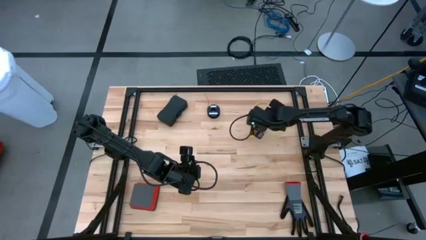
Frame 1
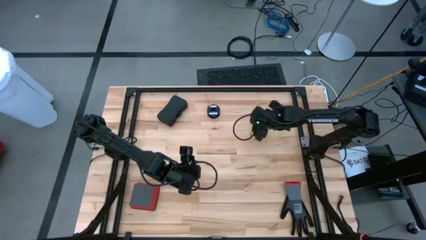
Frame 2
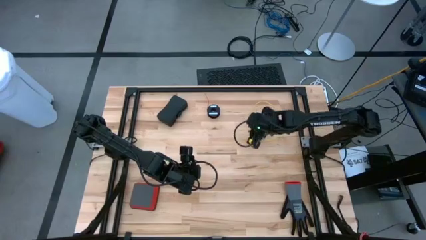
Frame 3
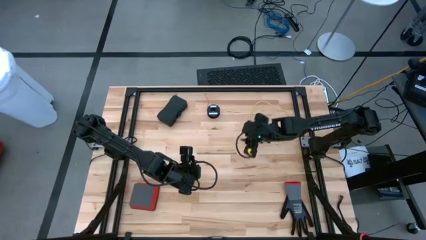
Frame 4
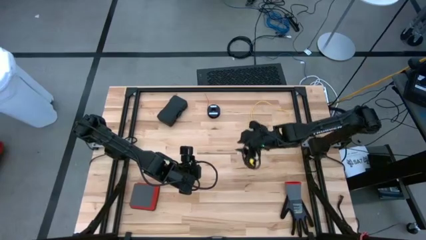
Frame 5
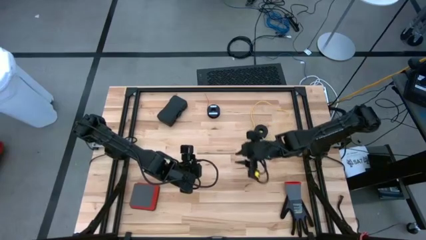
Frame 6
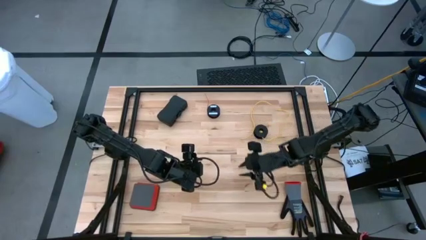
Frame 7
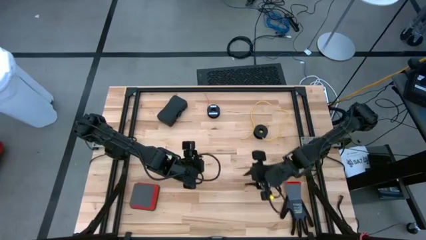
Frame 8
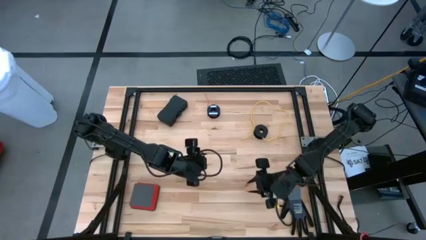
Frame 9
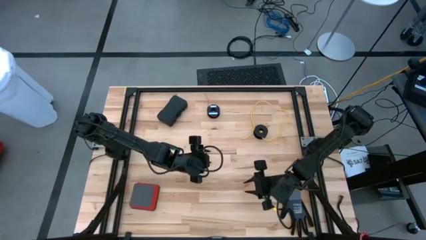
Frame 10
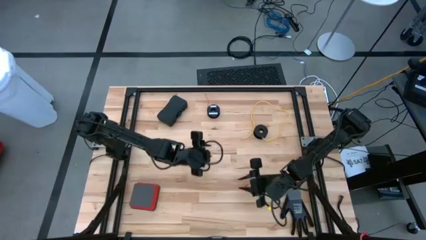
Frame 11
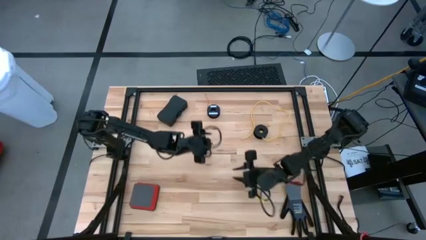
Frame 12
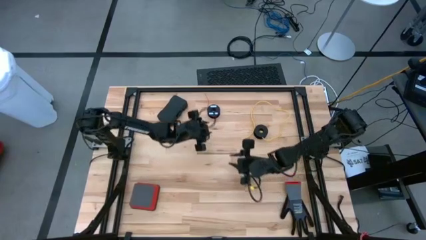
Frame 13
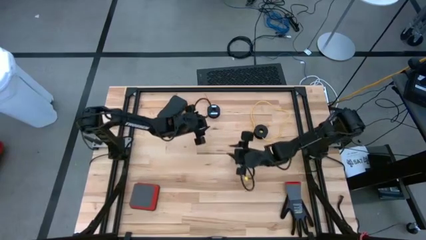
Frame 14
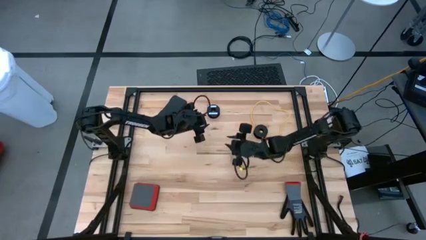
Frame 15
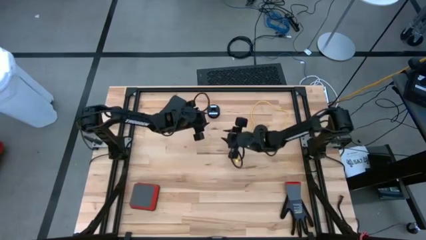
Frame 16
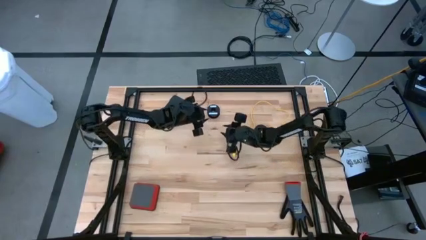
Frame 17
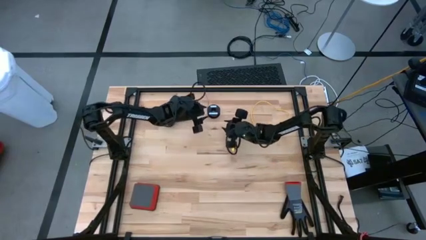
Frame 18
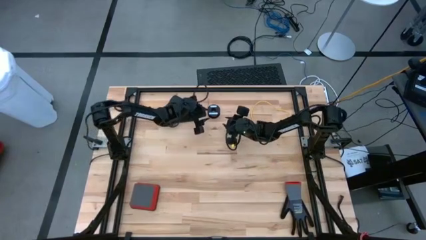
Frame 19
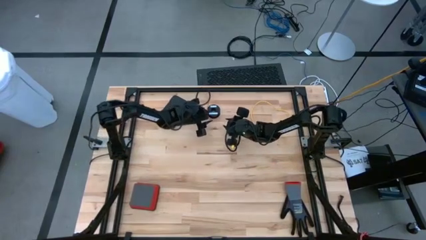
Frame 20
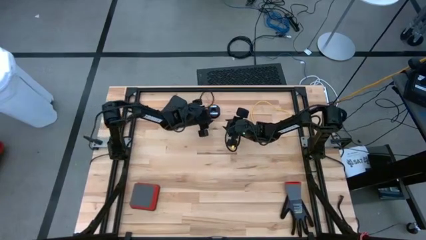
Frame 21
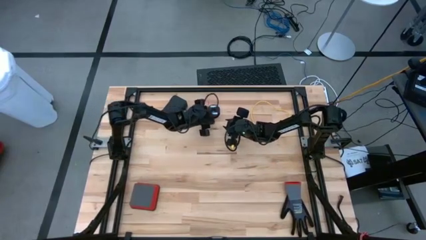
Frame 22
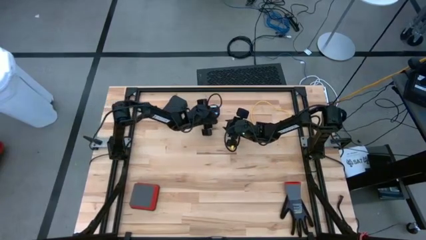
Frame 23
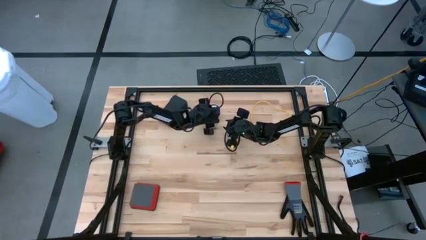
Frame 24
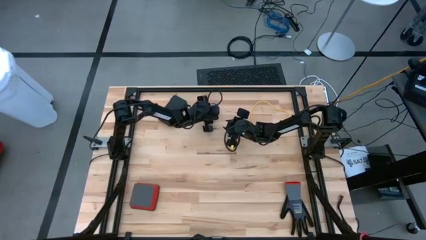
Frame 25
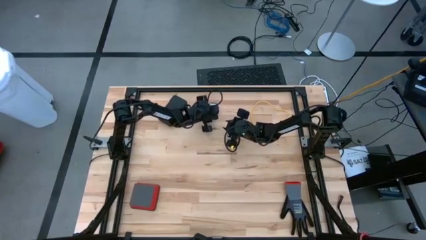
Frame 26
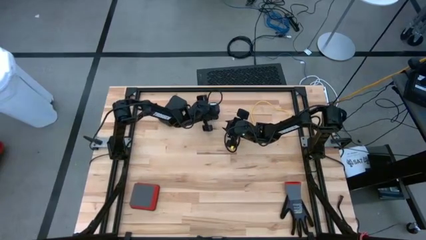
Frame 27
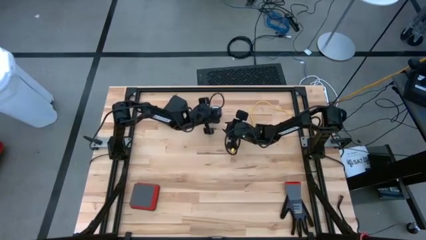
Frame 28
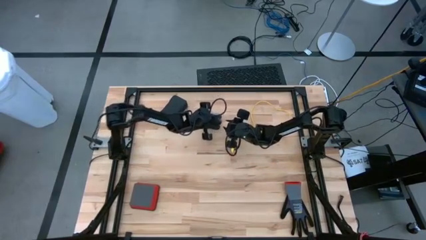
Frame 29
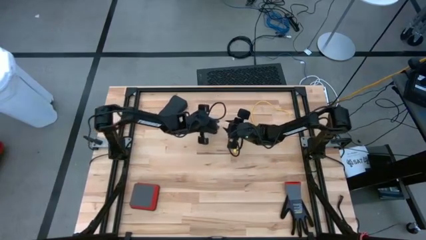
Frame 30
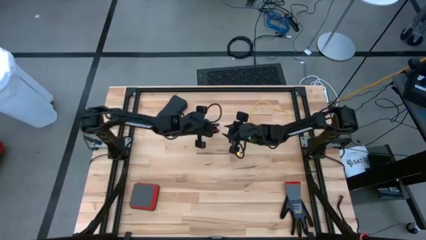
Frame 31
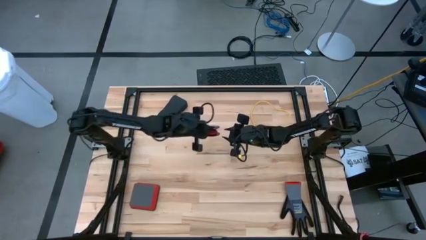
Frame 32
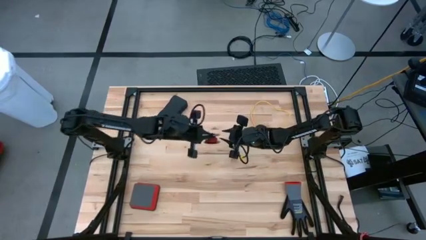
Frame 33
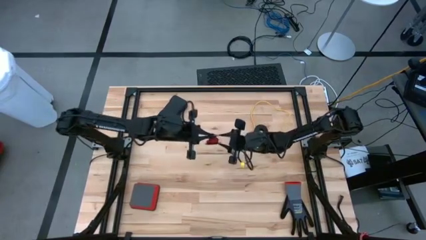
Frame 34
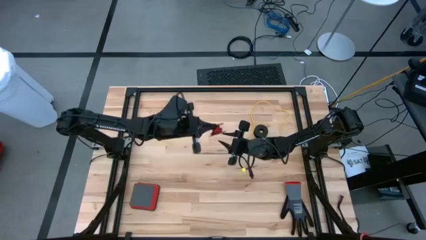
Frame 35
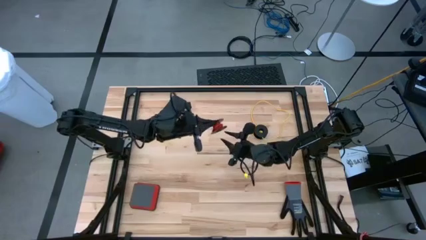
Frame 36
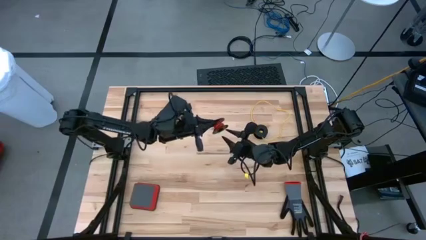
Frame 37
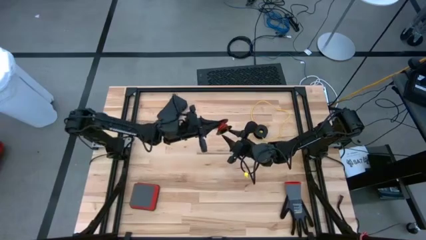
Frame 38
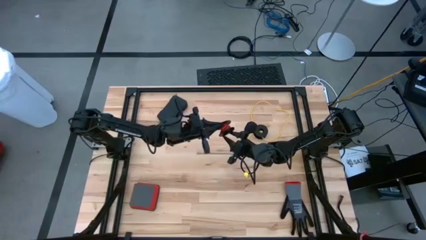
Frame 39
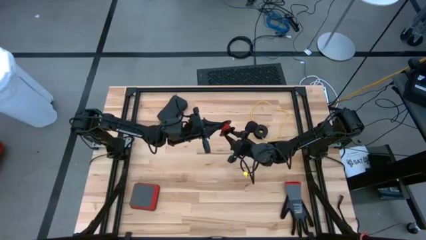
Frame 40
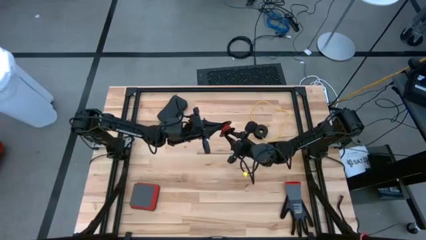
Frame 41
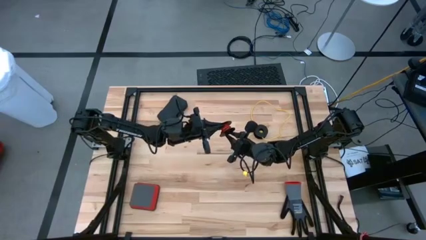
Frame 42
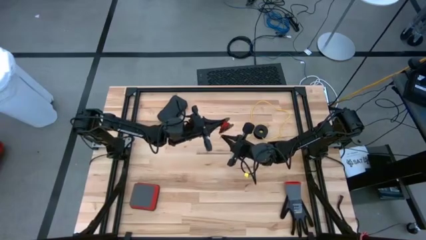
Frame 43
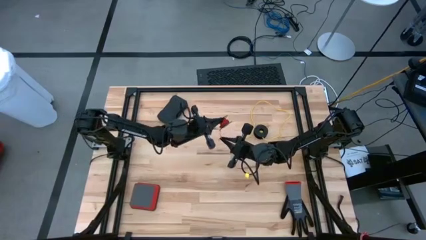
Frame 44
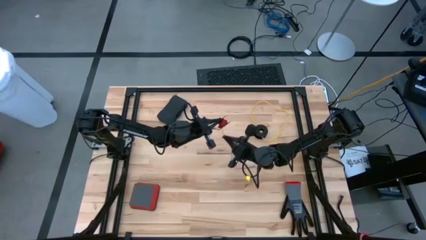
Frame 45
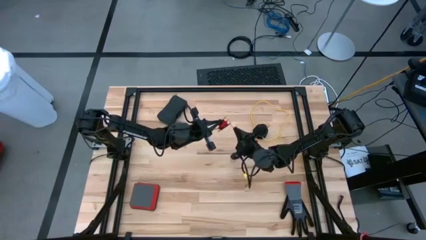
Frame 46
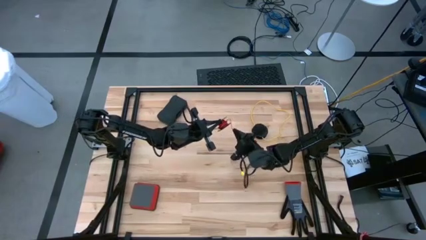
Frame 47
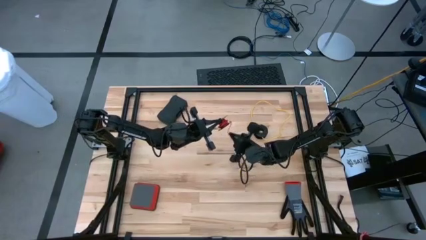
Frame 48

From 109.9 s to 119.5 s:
Task: Coil cords
Uncoil the red wire from the black spool

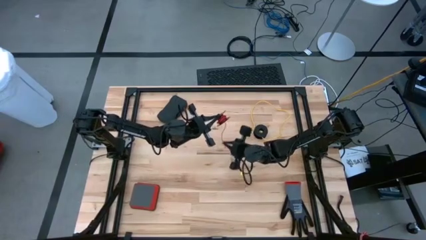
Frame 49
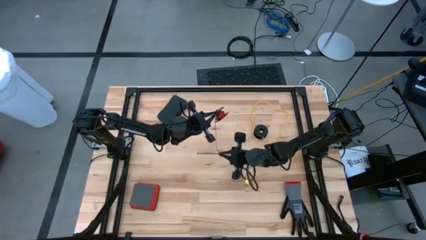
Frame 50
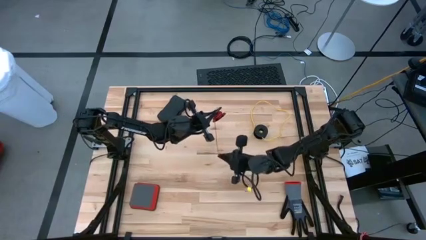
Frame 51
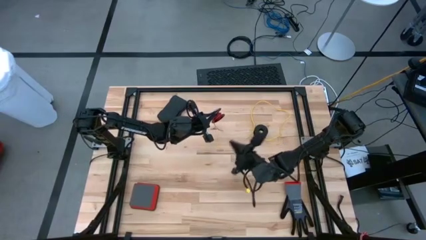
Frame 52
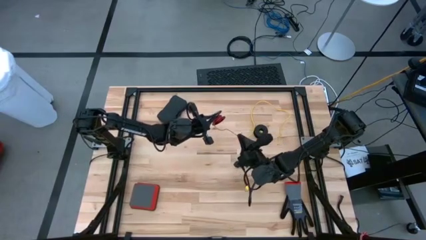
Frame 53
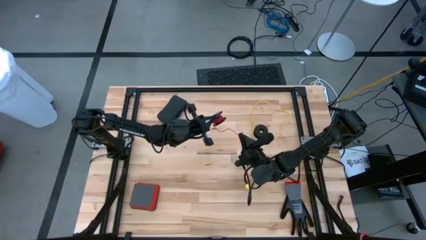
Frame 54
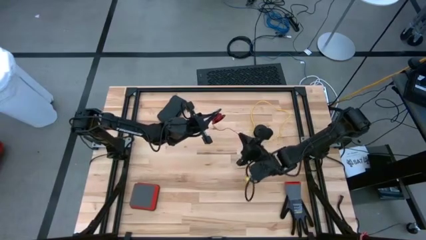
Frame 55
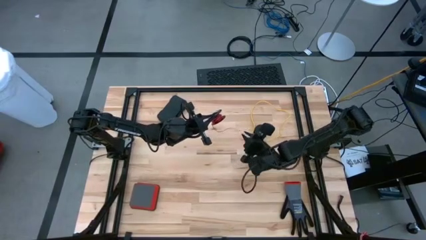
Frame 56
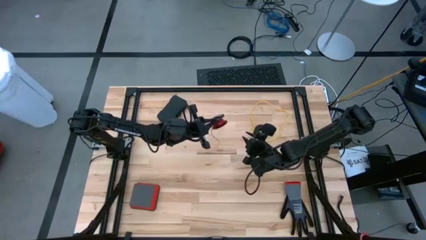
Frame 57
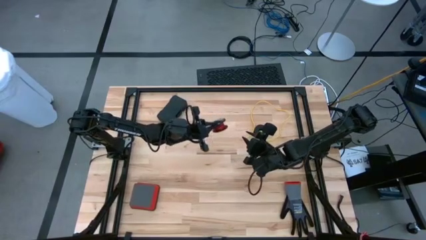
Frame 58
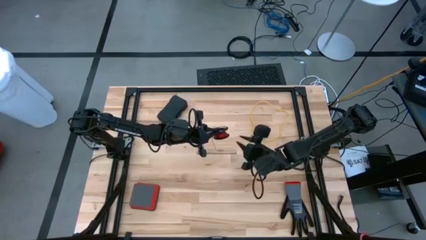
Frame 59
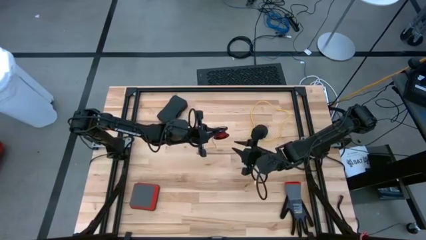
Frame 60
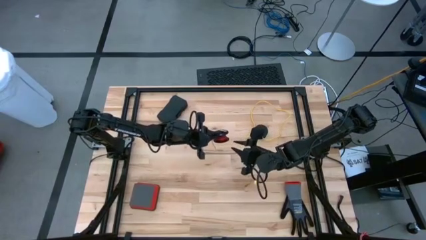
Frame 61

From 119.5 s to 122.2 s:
Uncoil the red wire from the black spool
